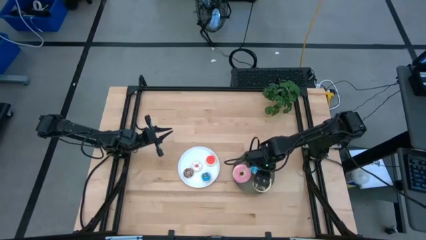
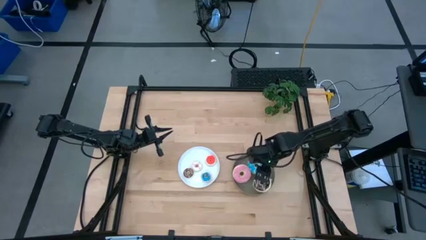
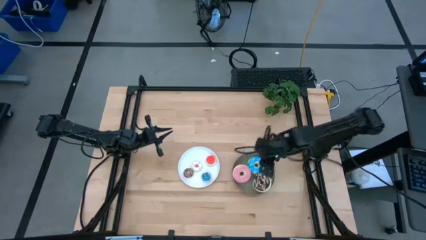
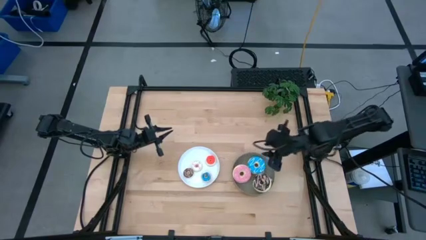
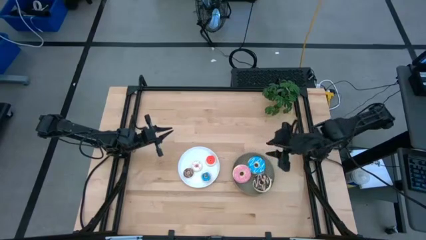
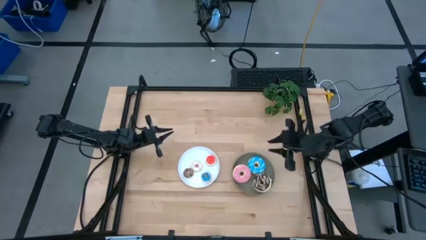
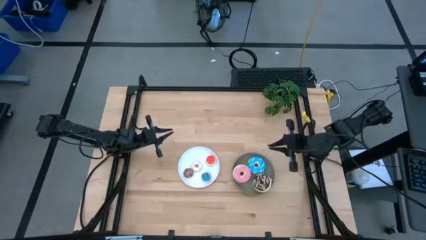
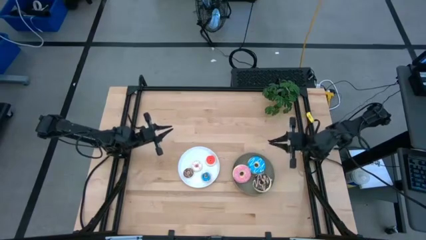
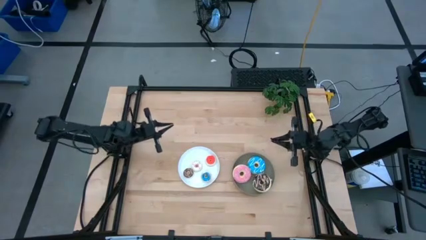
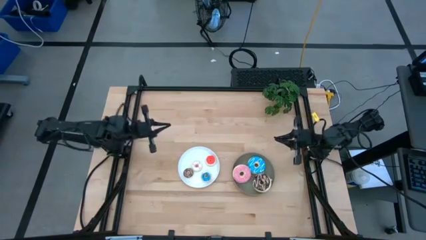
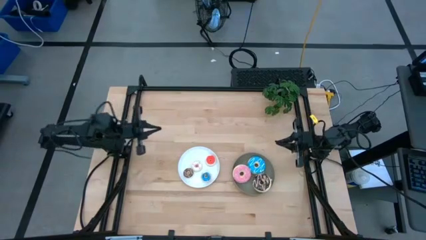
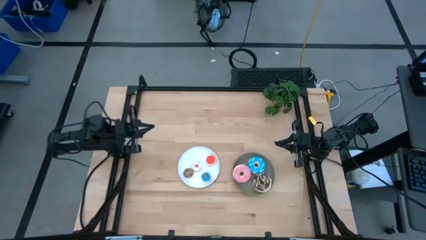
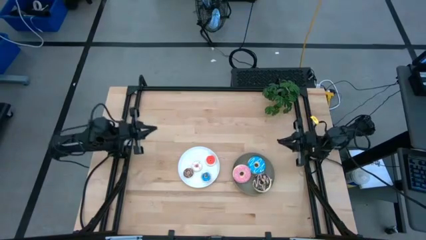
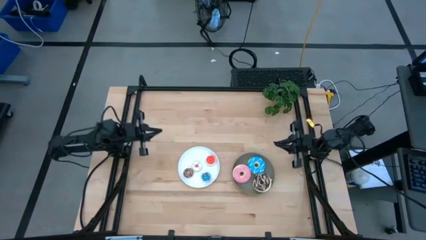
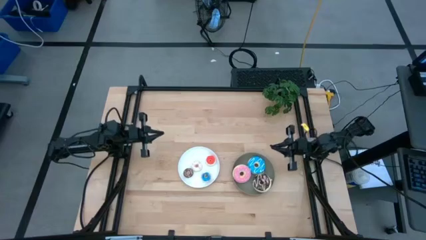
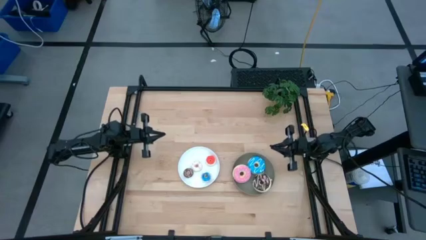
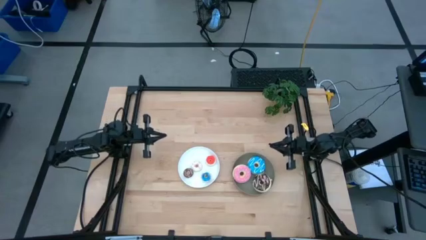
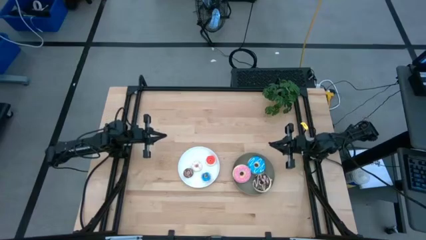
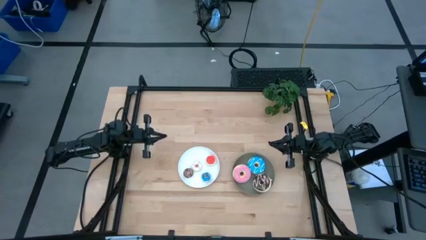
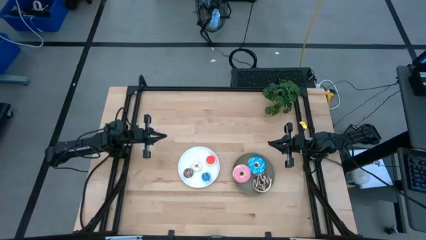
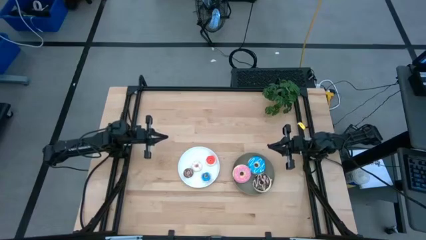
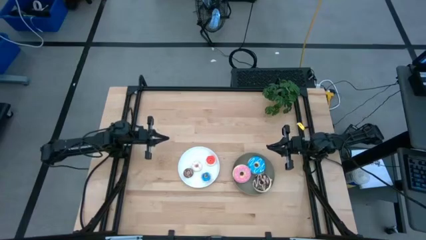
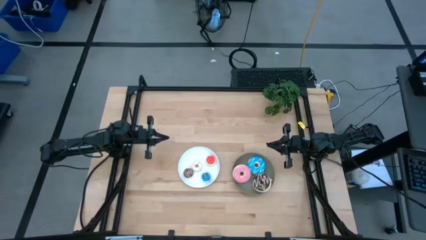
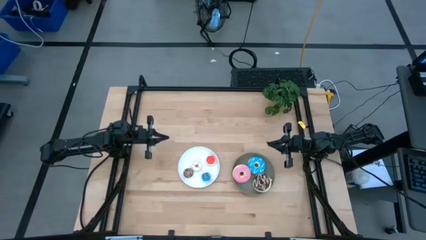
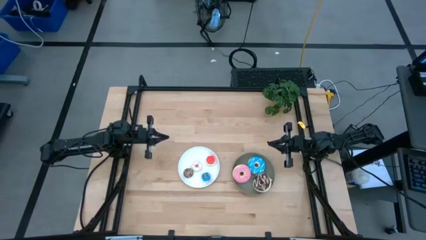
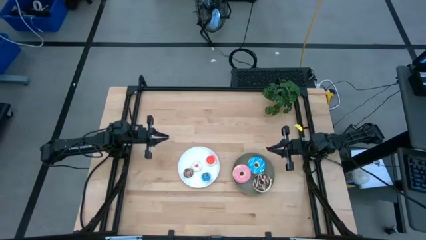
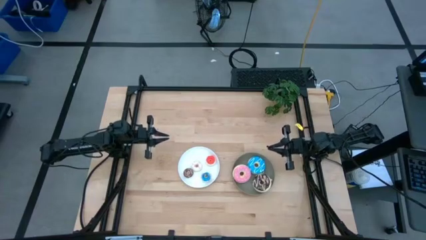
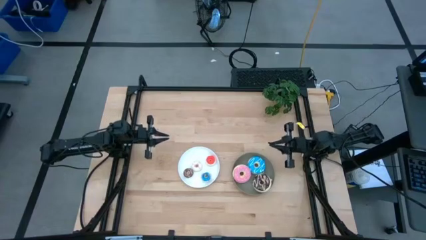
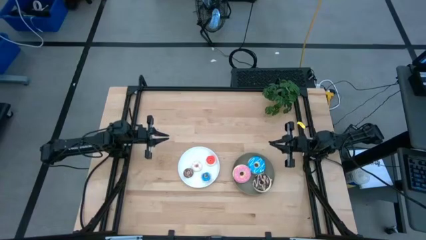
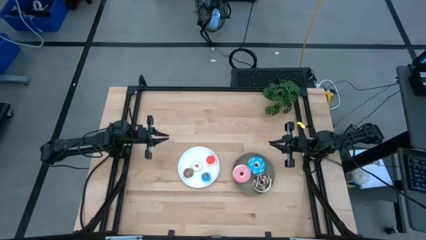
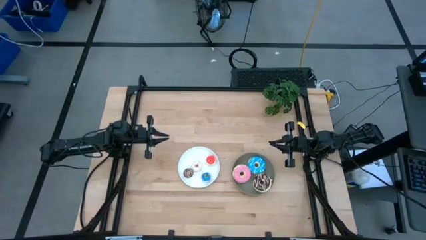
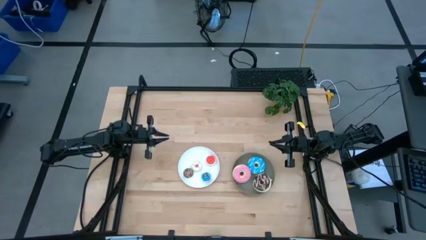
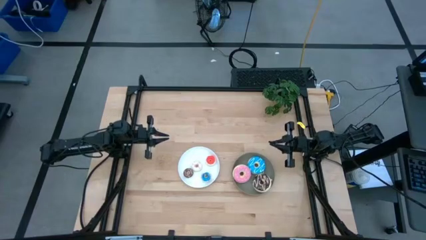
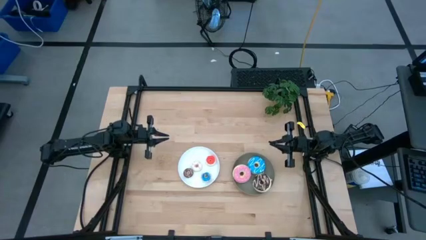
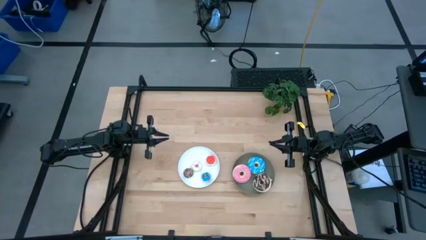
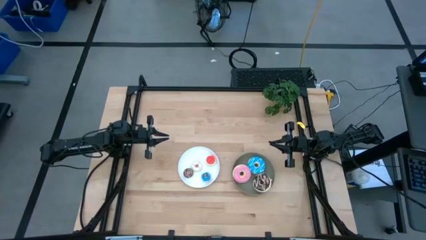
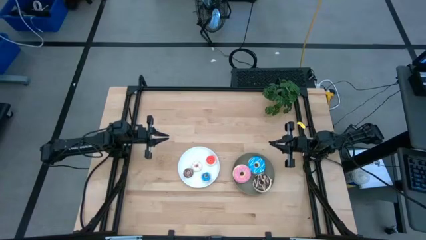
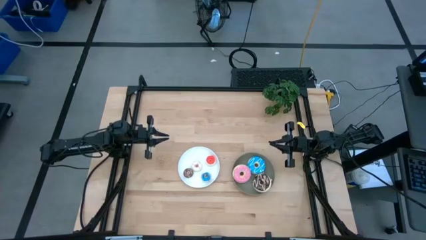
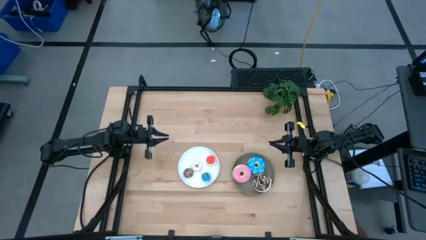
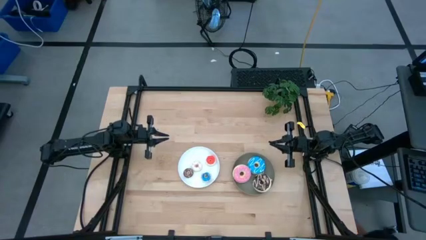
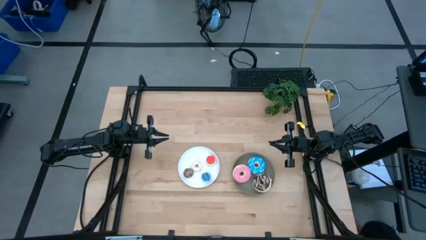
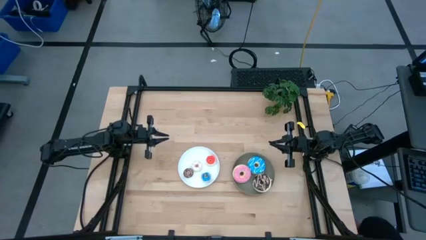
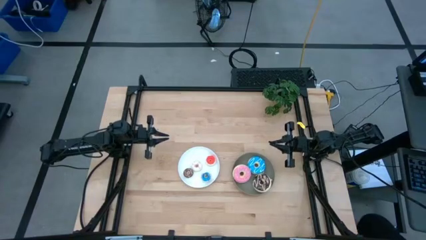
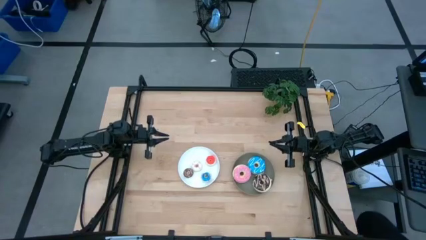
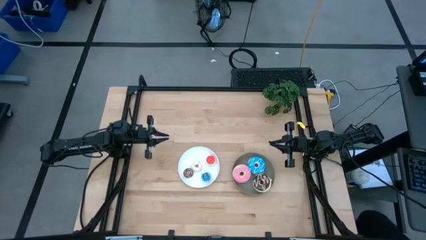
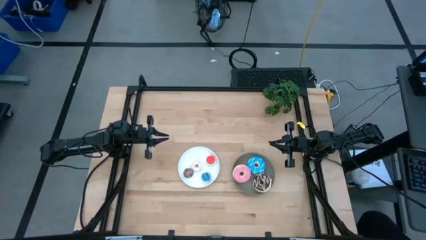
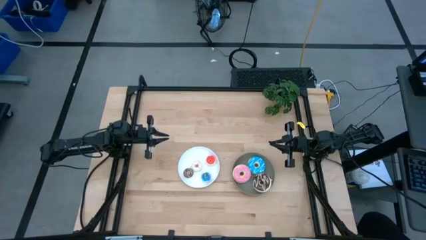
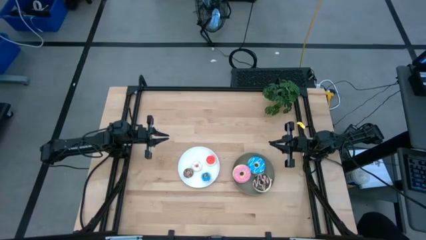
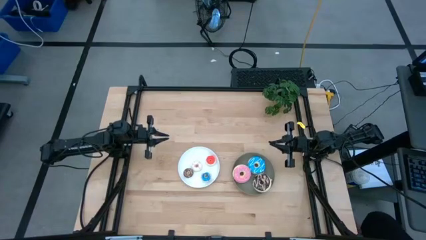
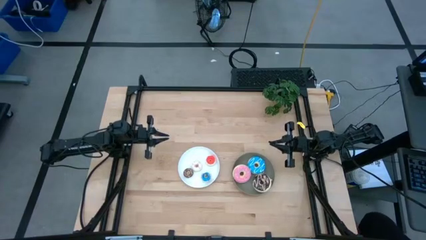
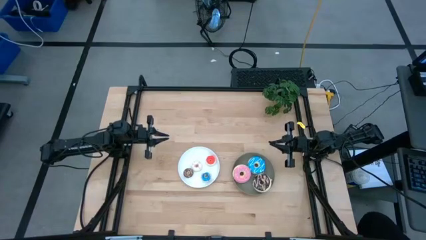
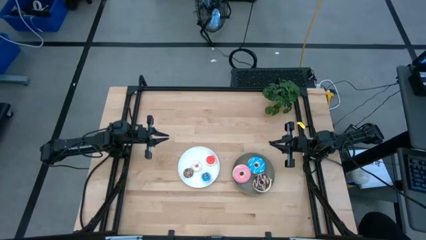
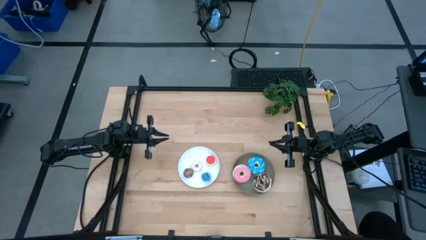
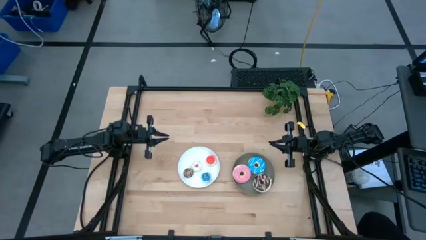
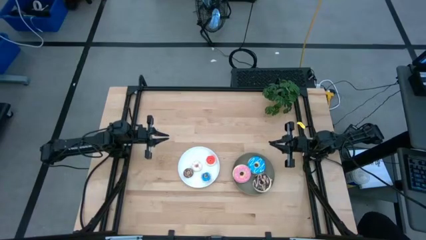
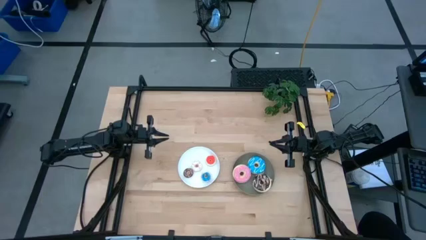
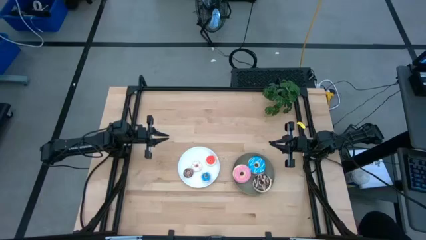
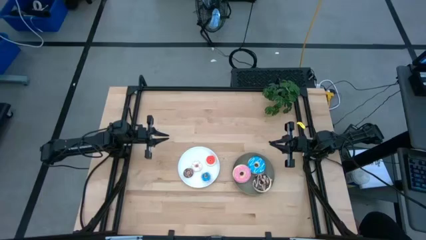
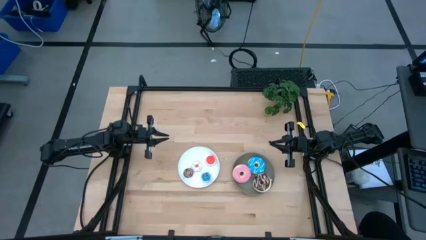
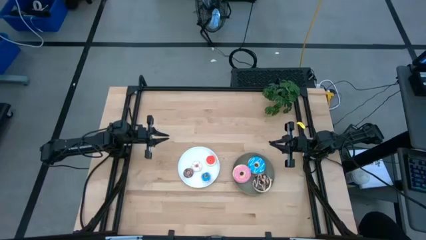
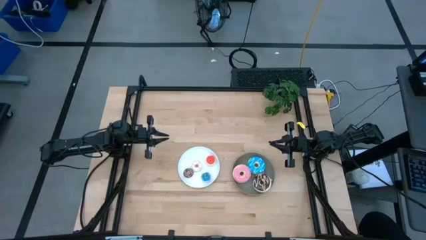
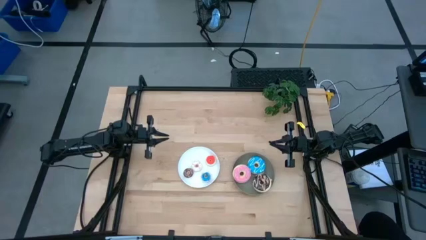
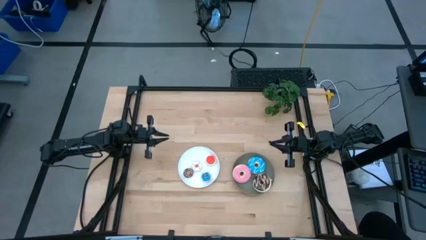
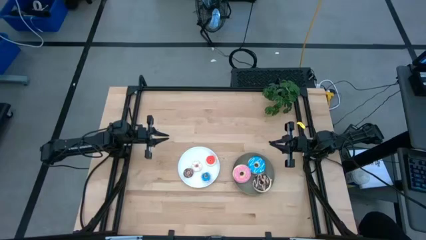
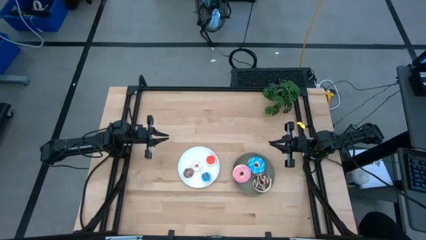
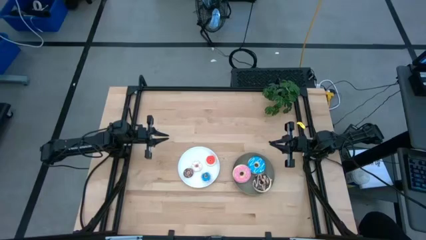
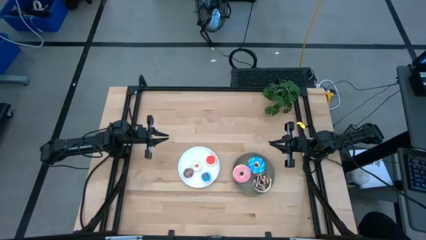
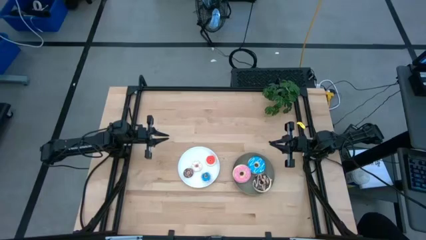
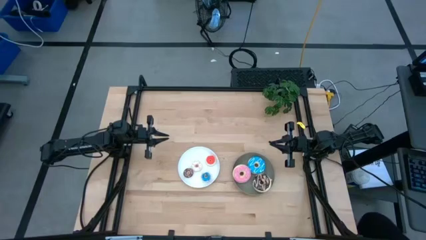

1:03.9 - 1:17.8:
Task: Pick & Place donuts
Return to Home Position
